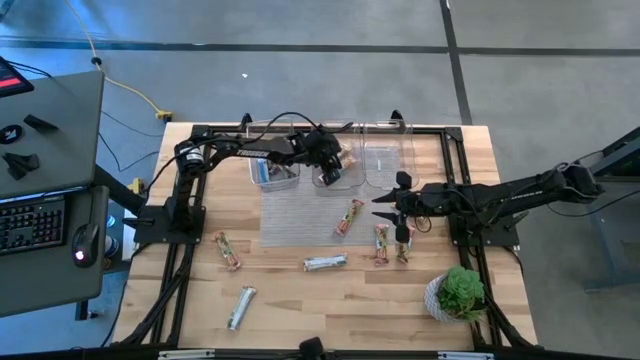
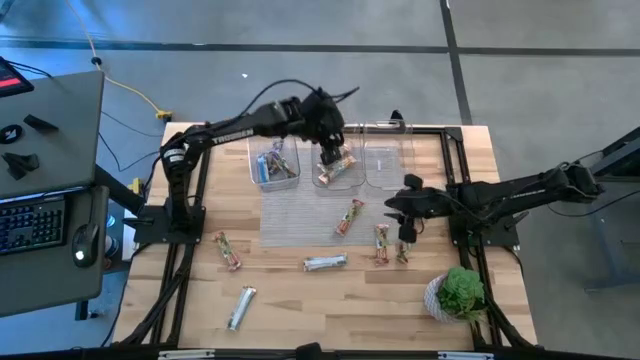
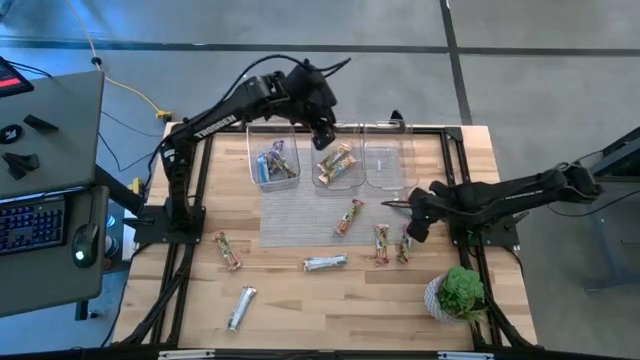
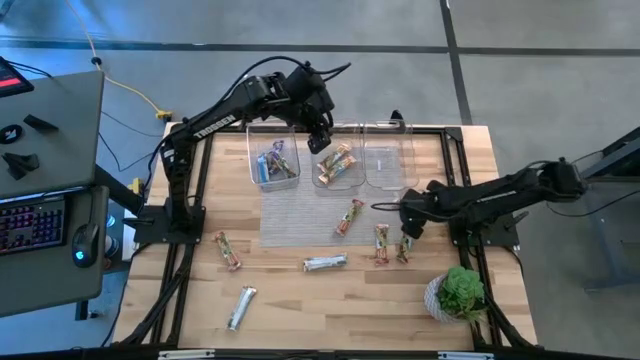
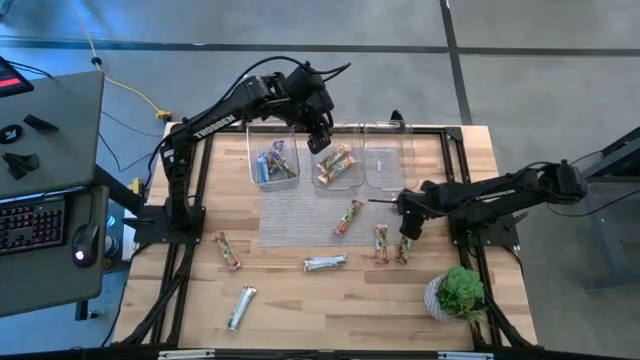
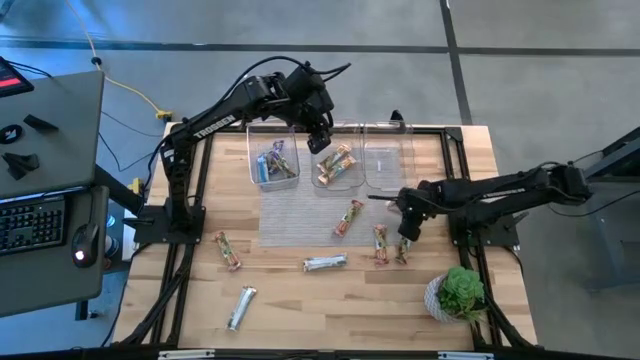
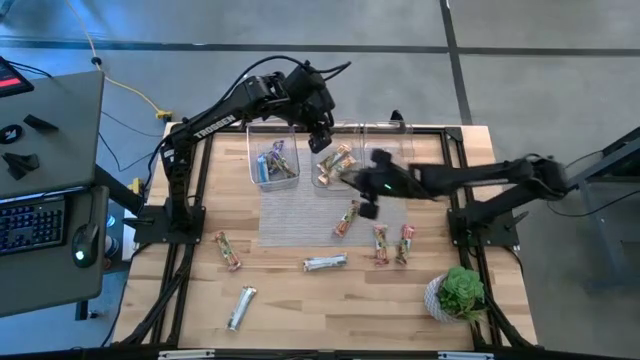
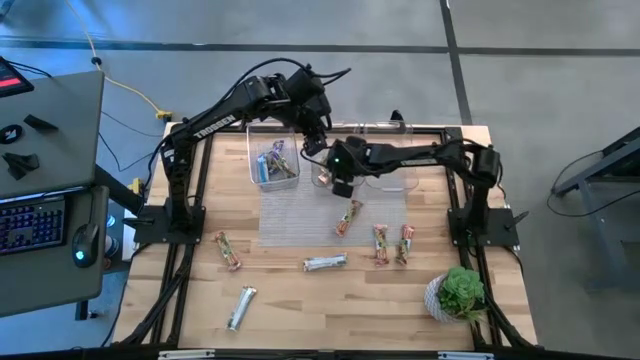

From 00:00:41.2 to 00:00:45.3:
Task: Pick and place Granola Bars by type
Put the yellow granola bar into the middle transparent bin

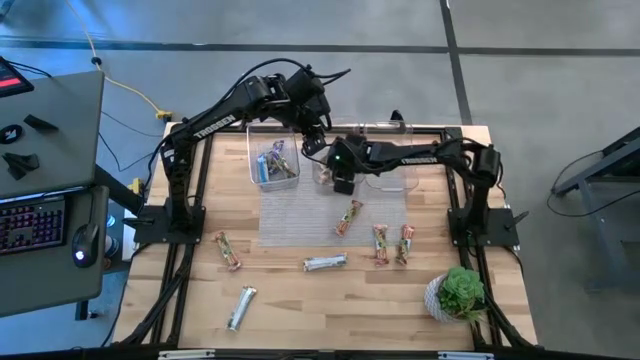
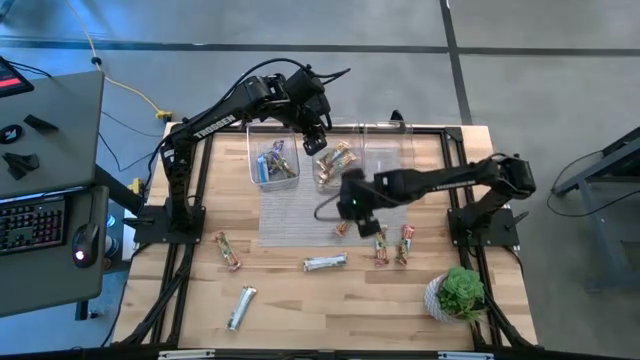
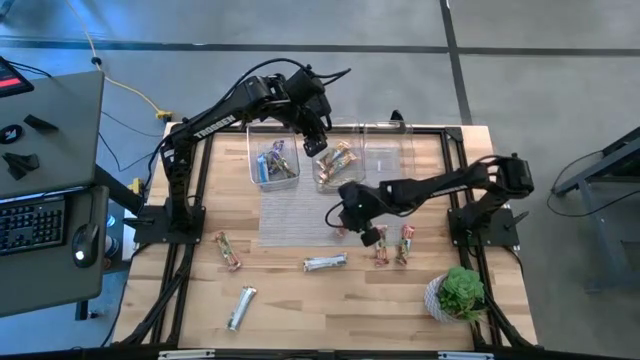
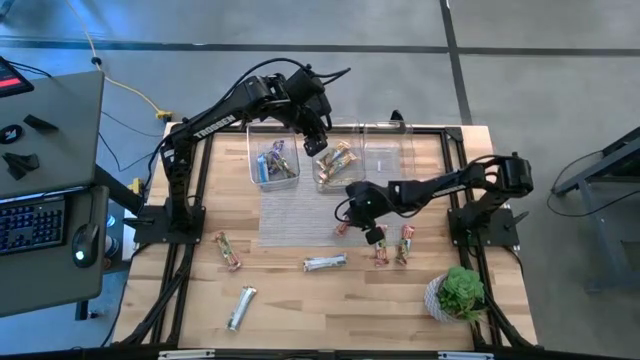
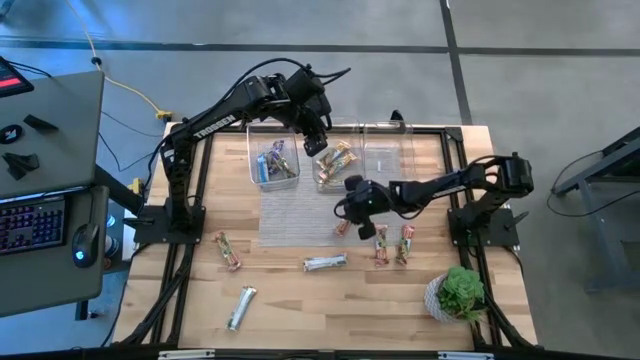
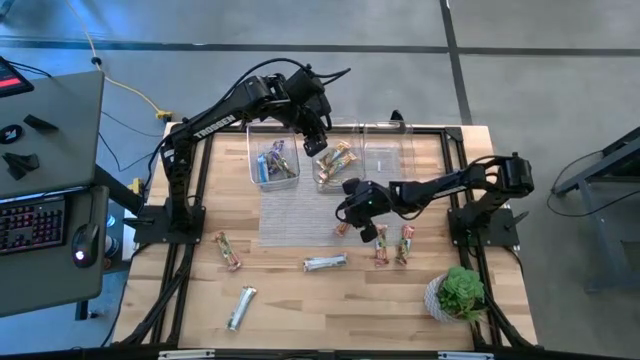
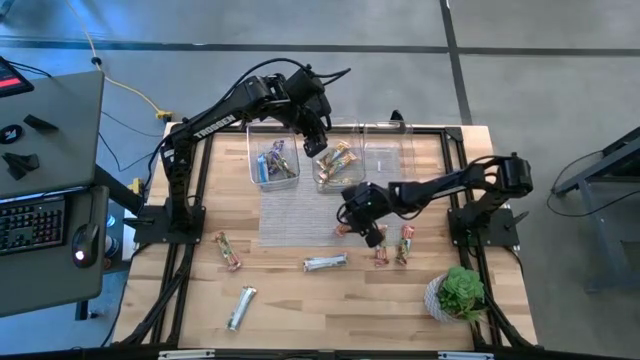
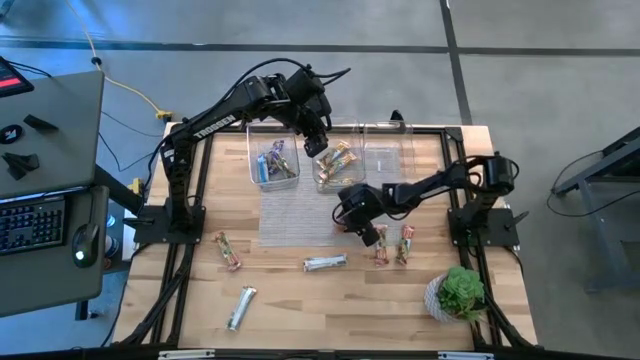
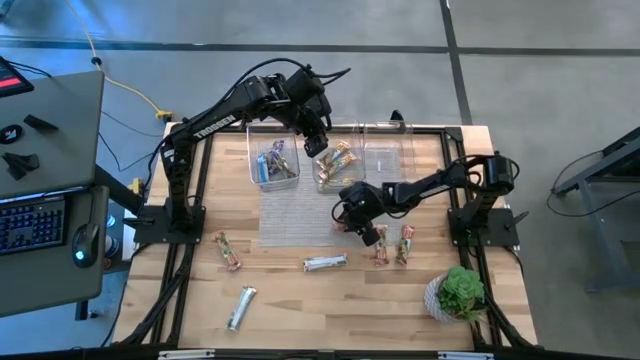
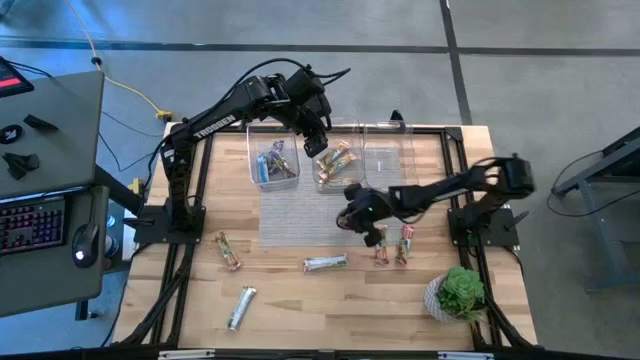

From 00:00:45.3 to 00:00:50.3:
Put the red granola bar into the right transparent bin

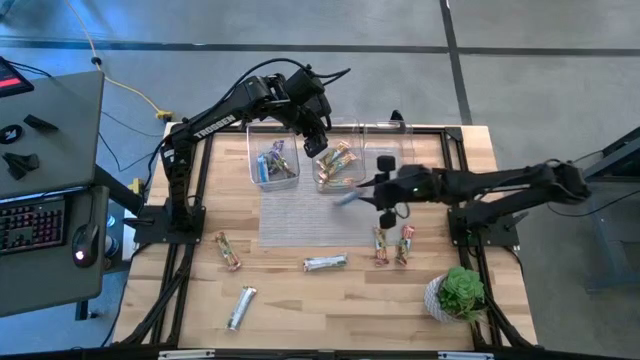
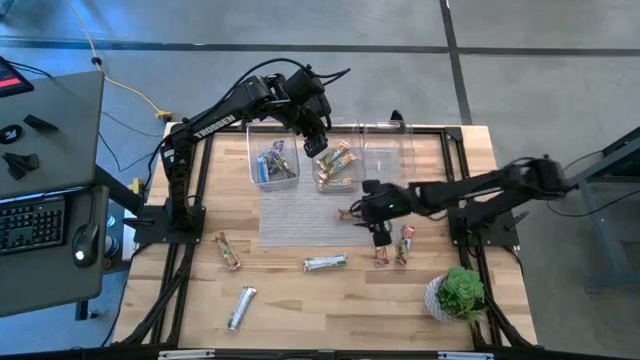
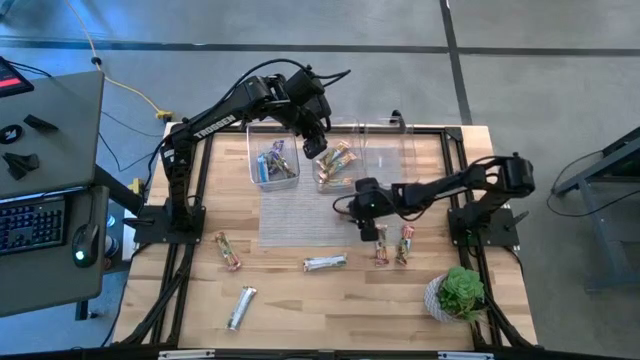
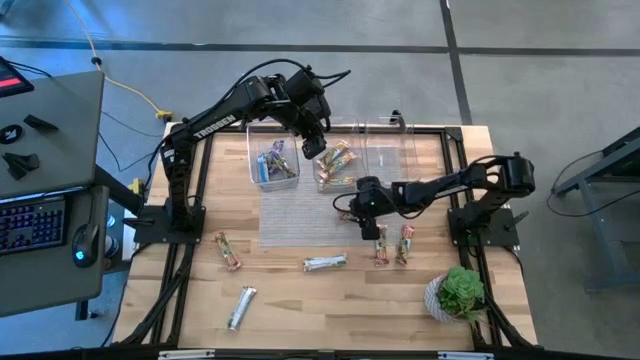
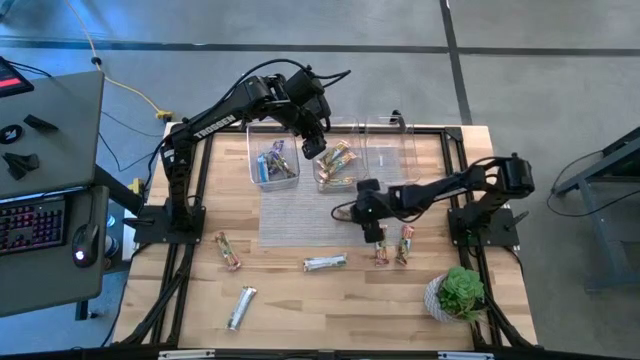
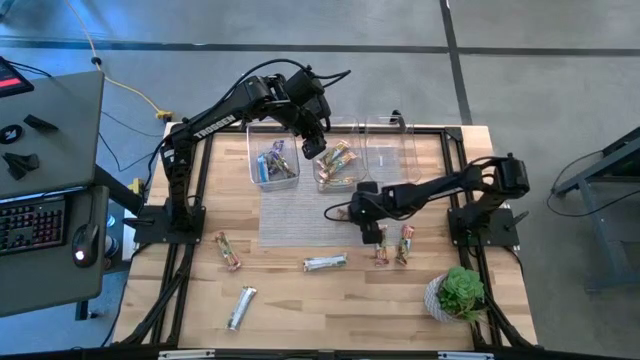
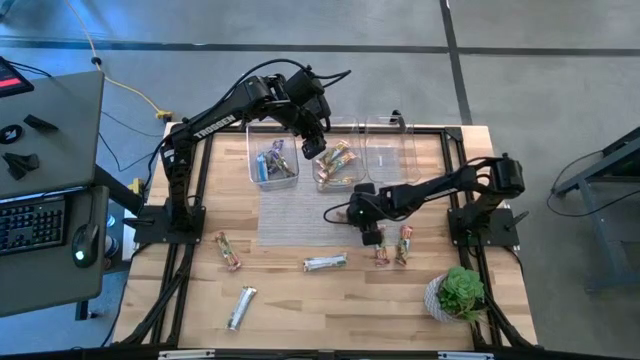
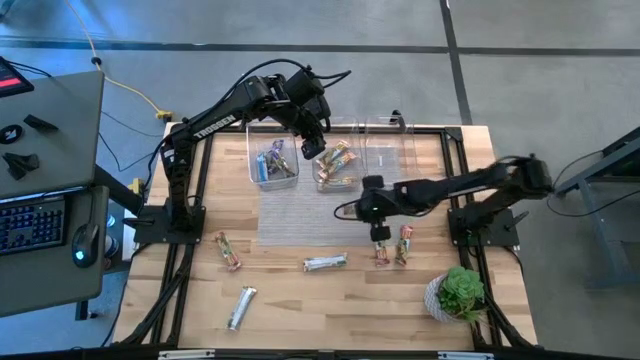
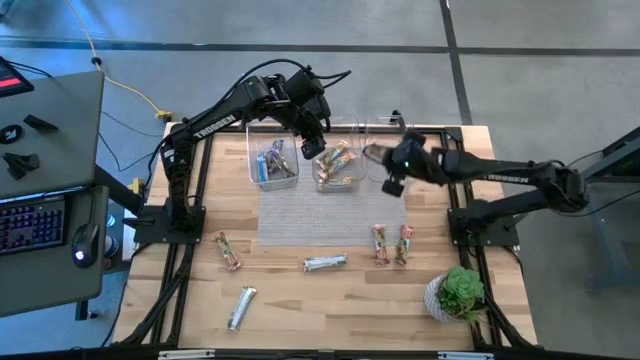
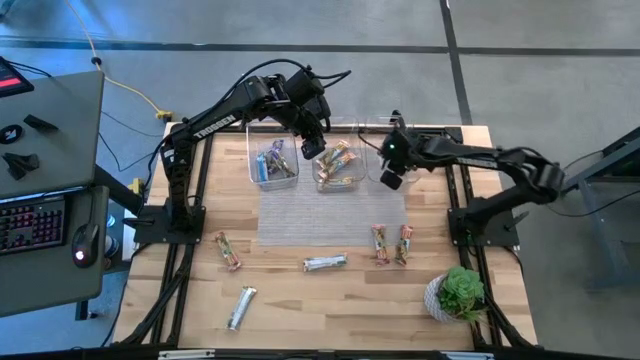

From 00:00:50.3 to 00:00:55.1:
Put the red granola bar into the right transparent bin

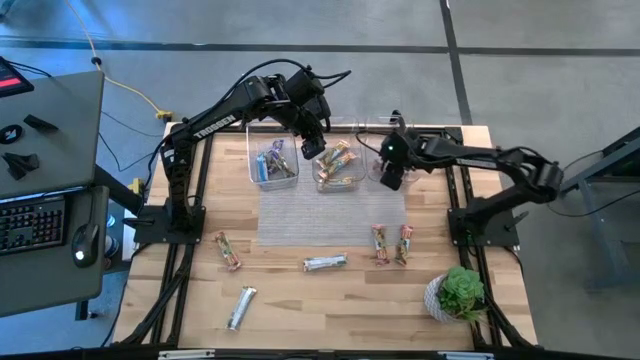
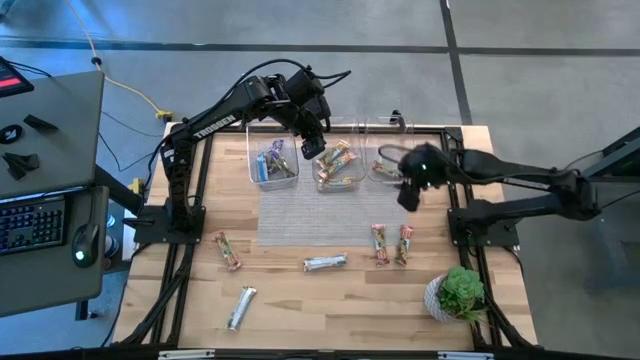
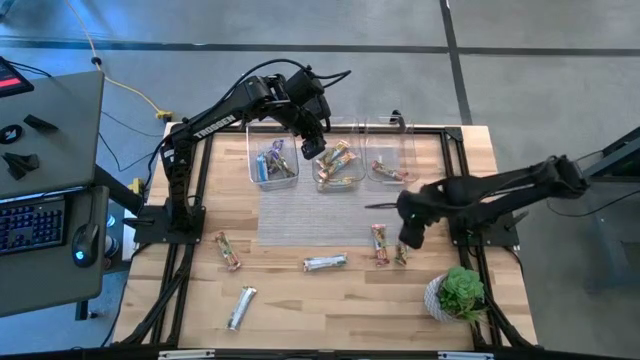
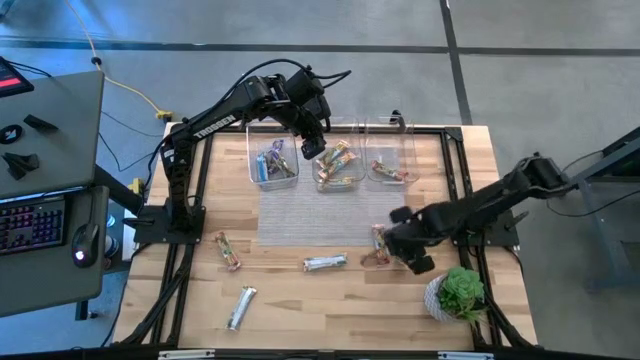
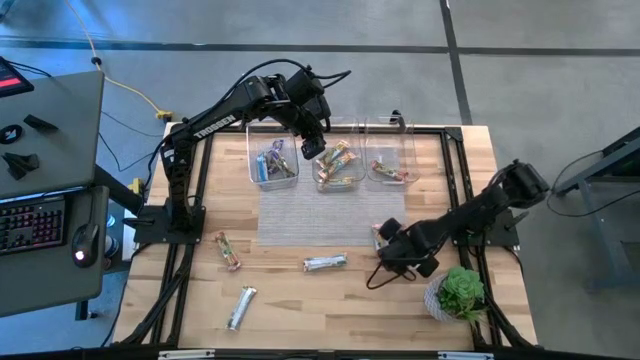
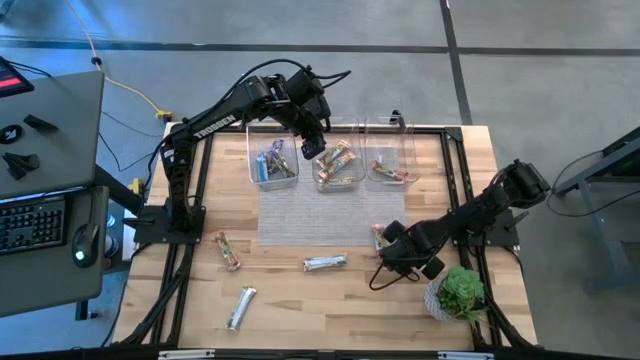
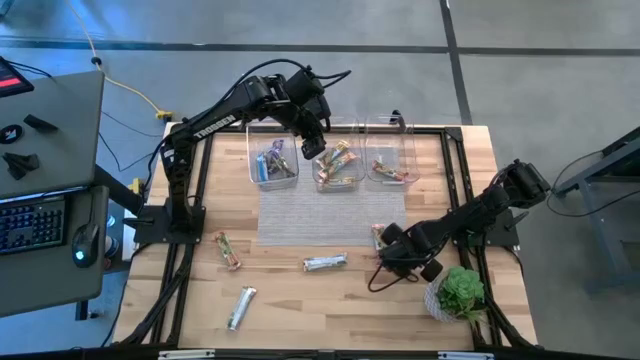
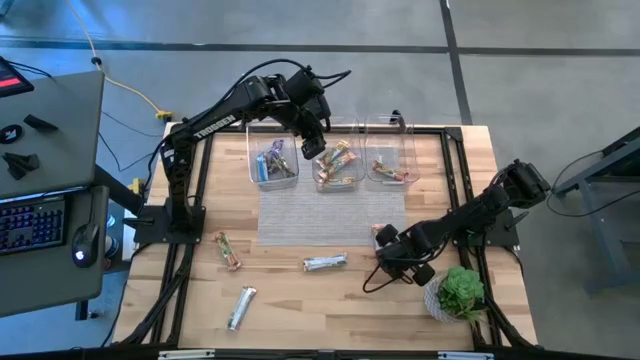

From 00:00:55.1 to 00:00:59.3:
Put the red granola bar into the right transparent bin

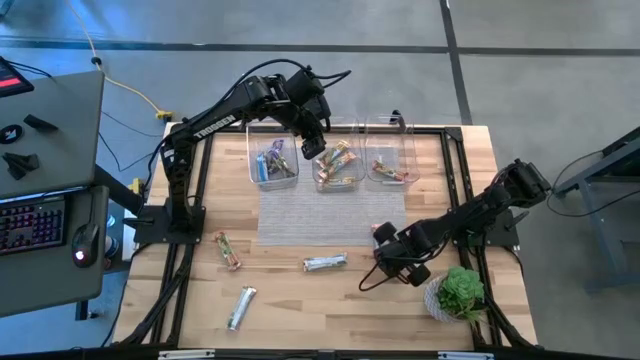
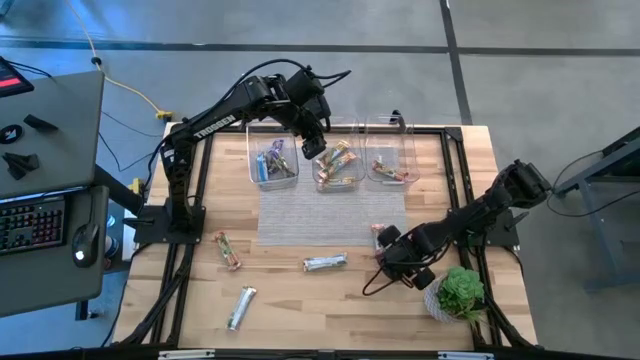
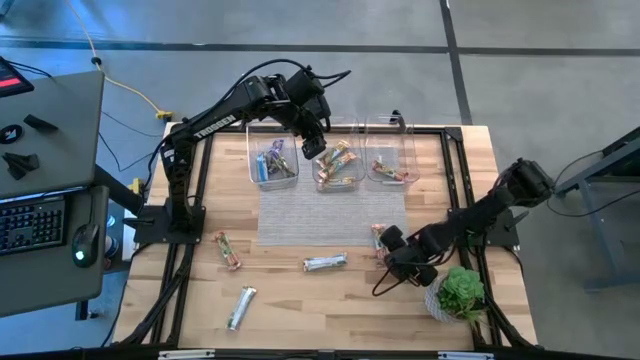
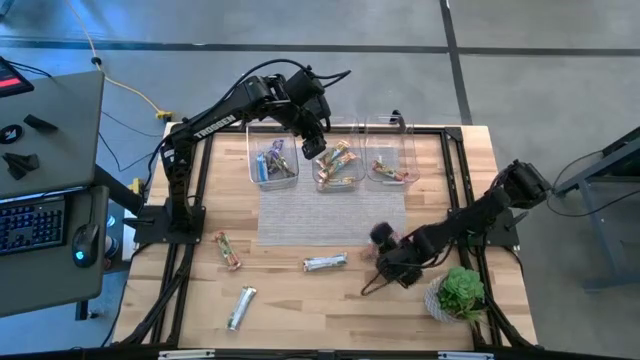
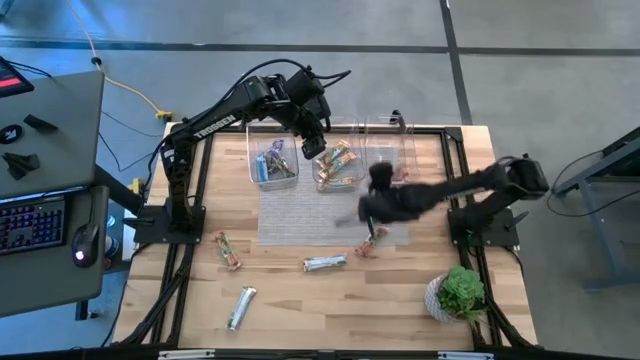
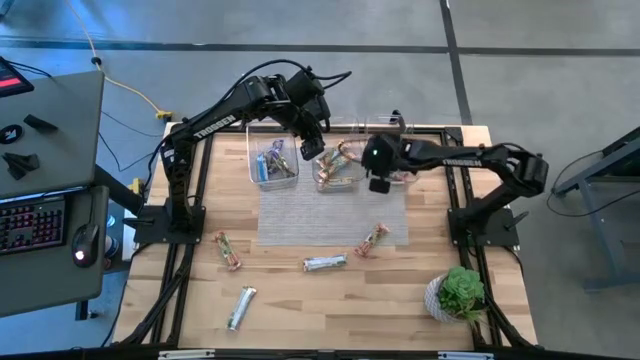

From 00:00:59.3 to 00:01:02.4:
Put the red granola bar into the right transparent bin
